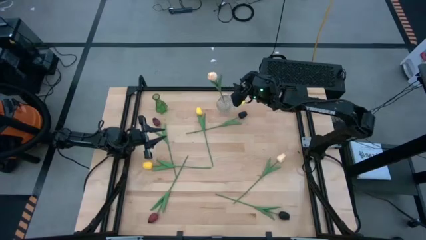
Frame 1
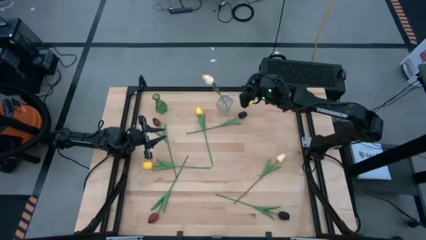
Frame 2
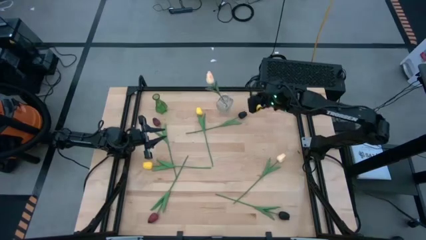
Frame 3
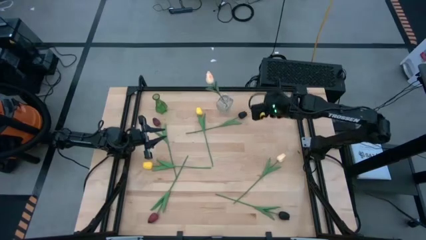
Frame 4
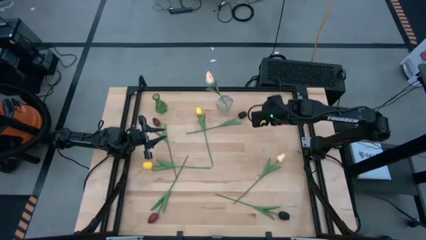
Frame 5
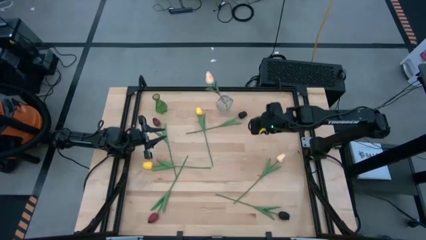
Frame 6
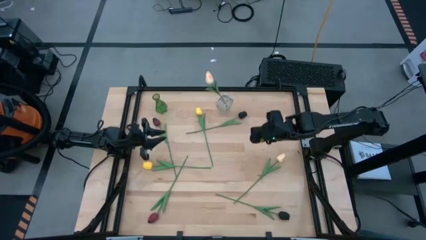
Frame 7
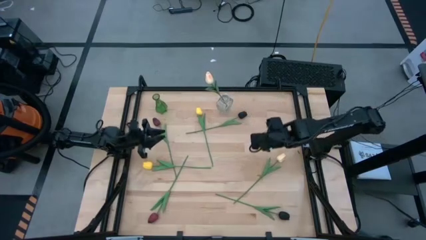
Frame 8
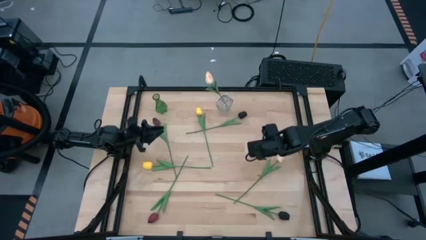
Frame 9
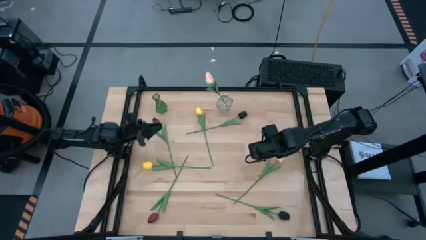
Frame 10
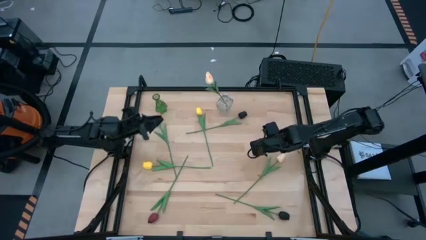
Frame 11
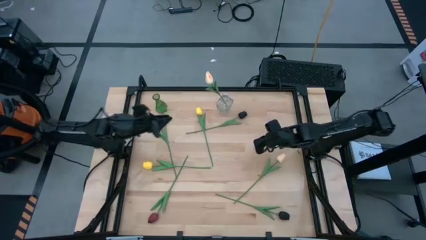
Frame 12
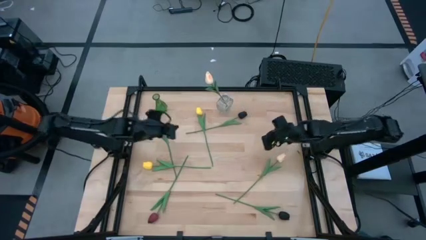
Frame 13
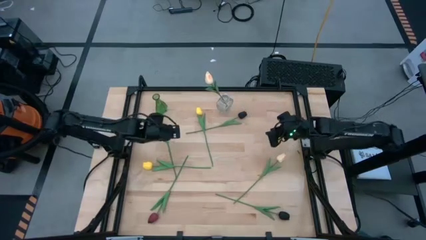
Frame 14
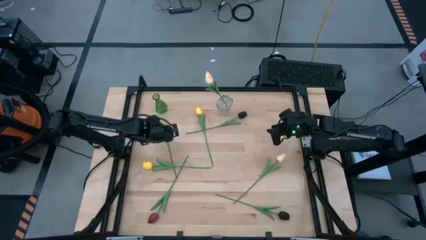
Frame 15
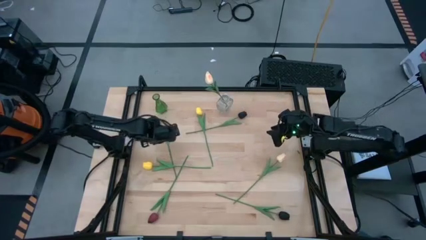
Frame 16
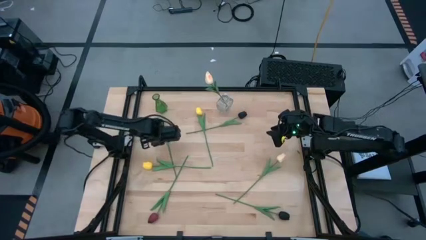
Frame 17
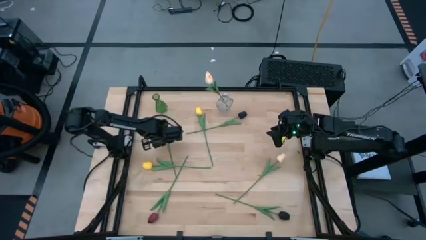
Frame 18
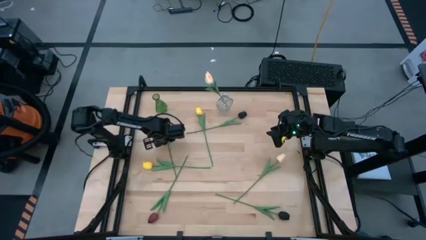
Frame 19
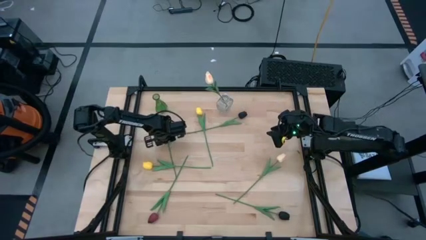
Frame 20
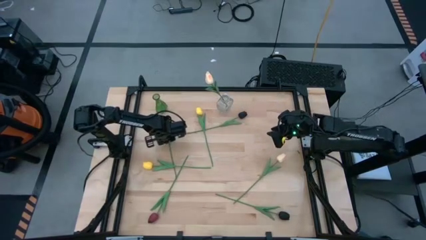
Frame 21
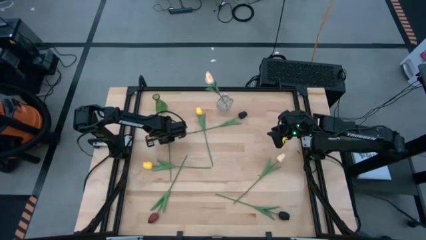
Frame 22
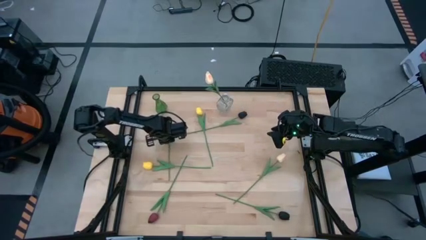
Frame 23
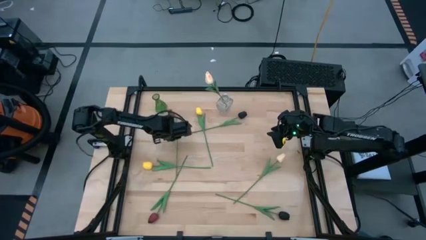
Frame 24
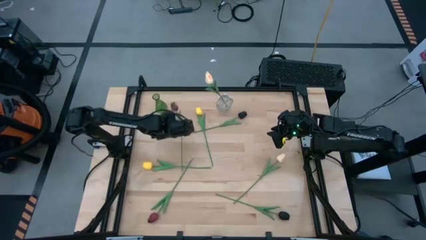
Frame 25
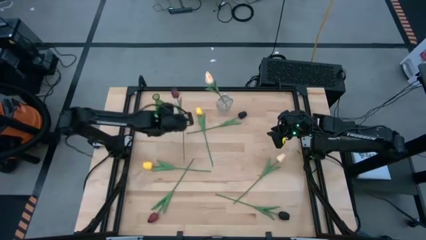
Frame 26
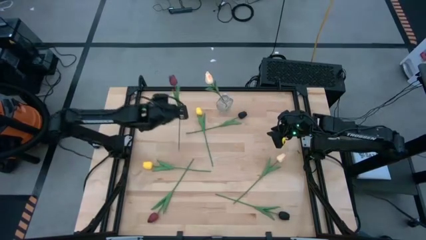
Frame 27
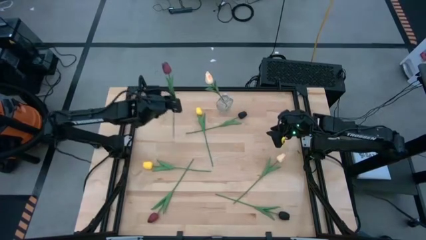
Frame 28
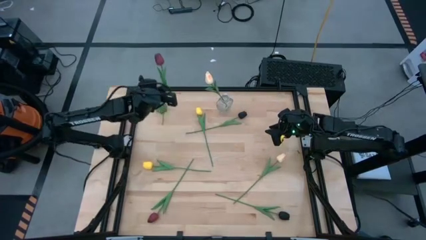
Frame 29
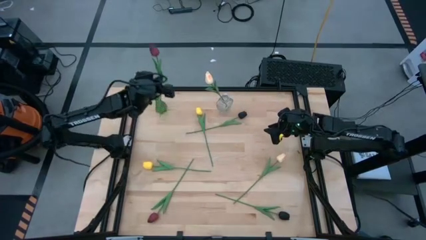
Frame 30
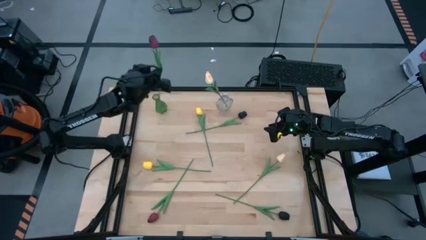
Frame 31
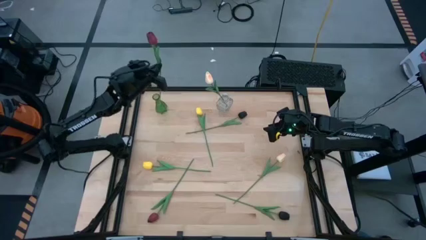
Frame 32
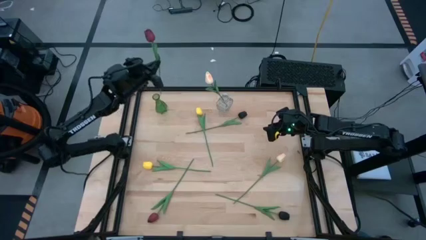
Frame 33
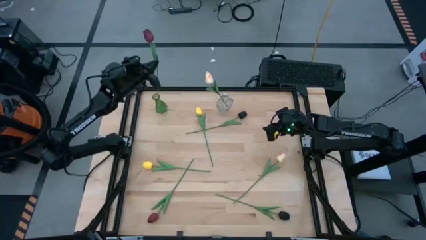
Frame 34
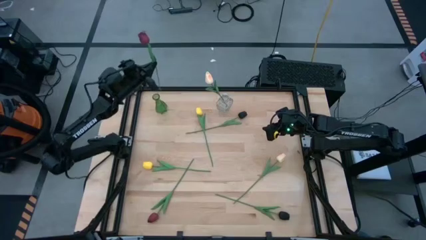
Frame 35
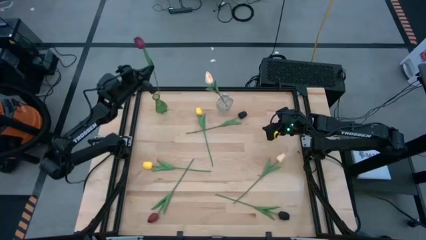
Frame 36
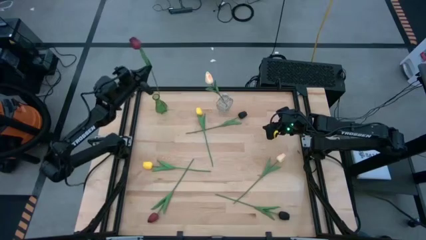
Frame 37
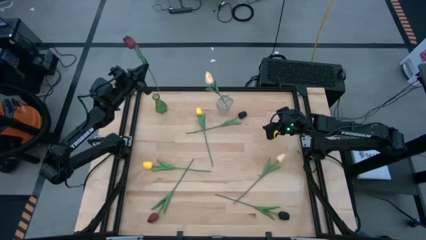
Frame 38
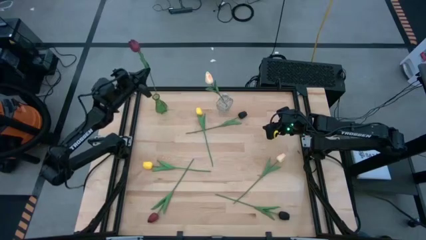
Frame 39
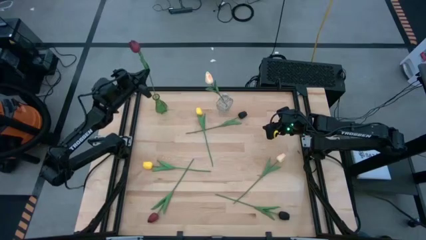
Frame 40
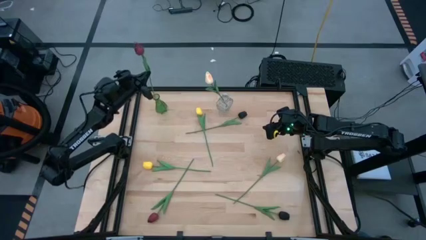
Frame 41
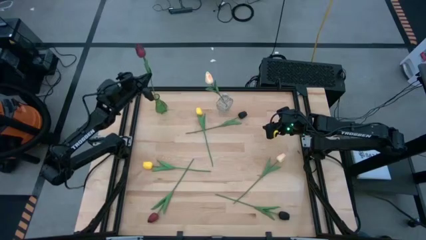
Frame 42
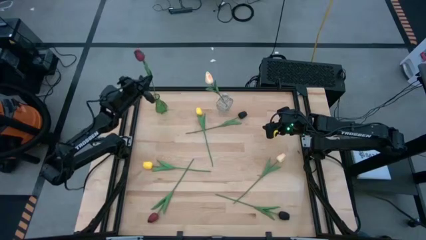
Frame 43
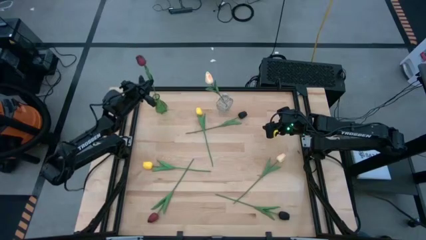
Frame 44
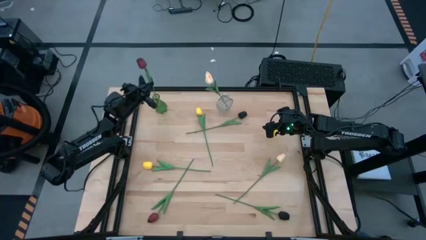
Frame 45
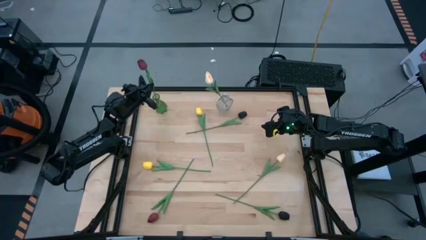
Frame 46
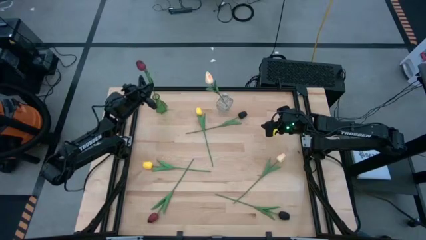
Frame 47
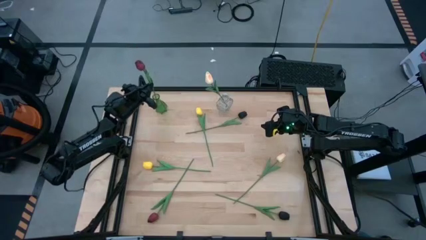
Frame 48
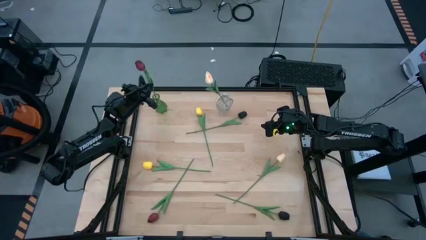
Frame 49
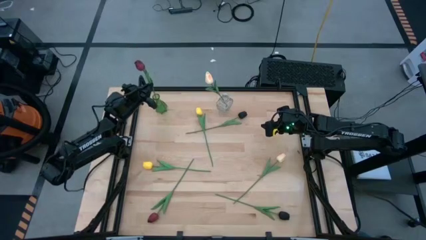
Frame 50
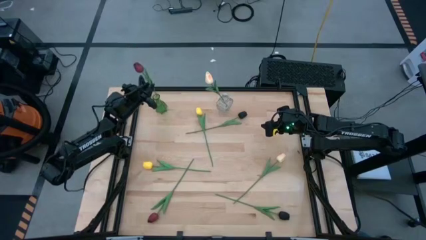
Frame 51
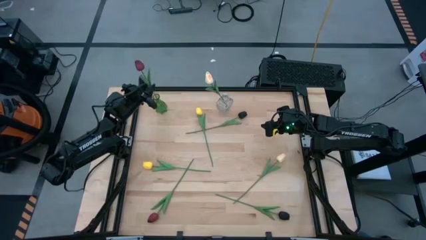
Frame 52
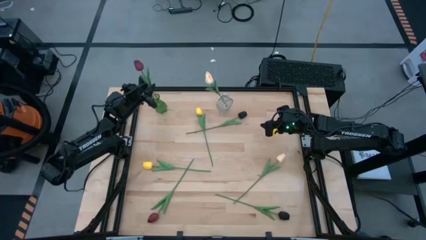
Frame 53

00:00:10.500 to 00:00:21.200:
Task: Sort flowers into vase by color
Put the top red tulip into the green vase
